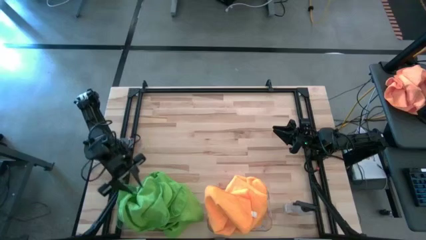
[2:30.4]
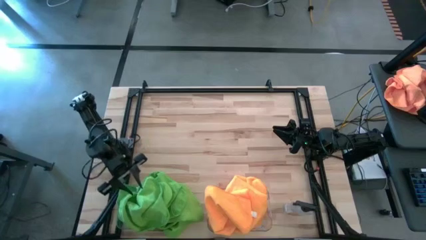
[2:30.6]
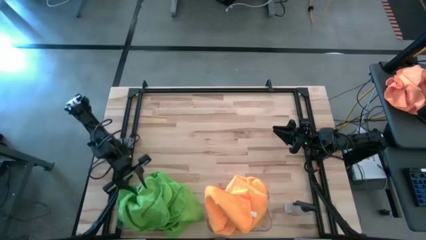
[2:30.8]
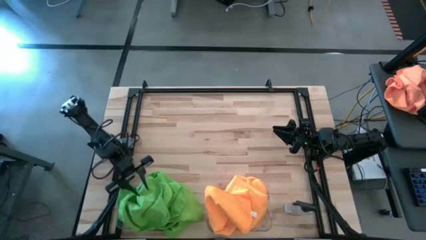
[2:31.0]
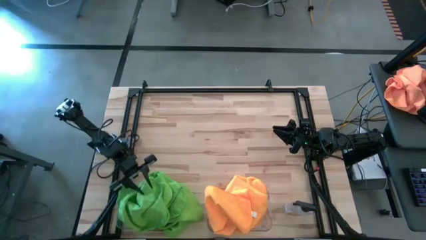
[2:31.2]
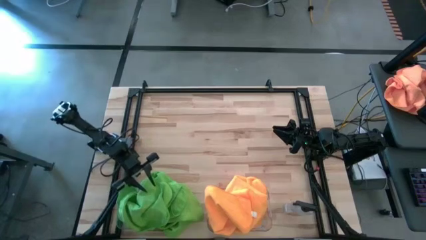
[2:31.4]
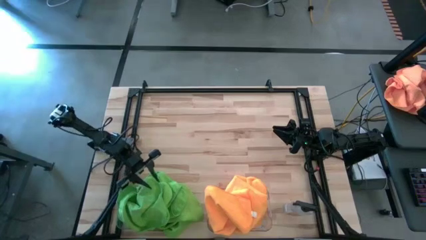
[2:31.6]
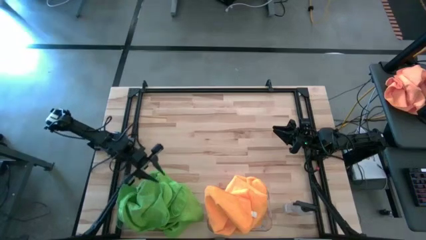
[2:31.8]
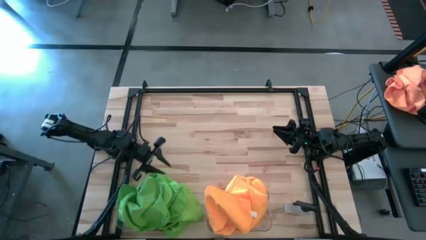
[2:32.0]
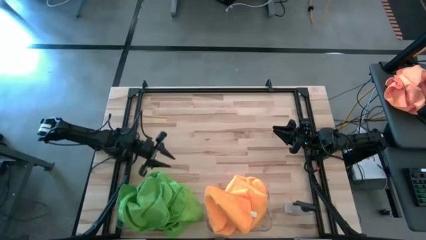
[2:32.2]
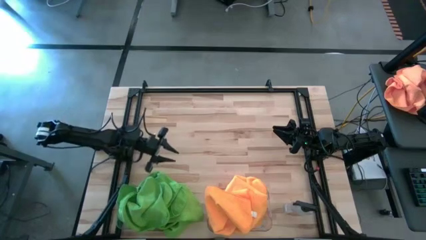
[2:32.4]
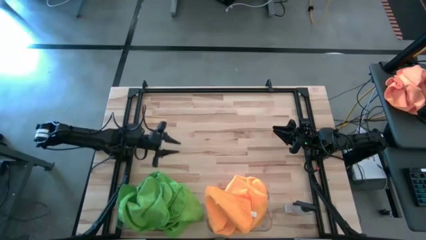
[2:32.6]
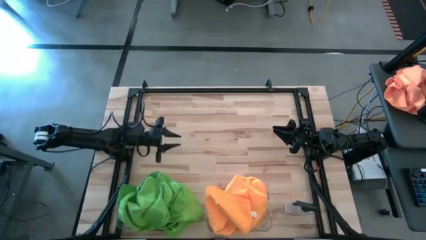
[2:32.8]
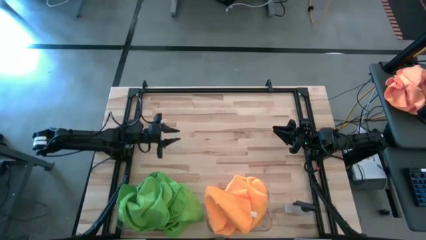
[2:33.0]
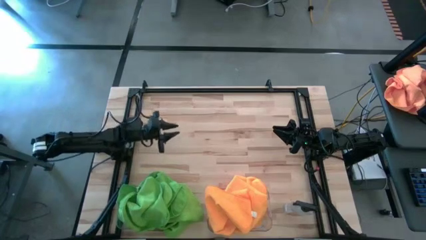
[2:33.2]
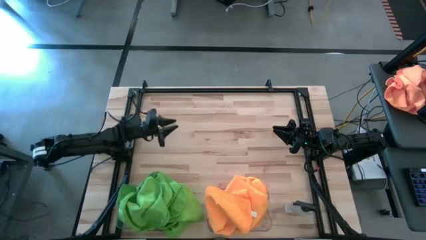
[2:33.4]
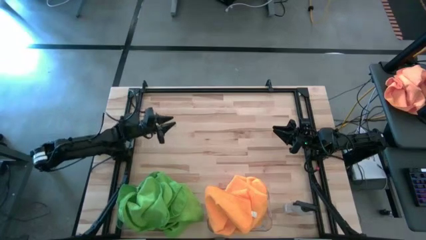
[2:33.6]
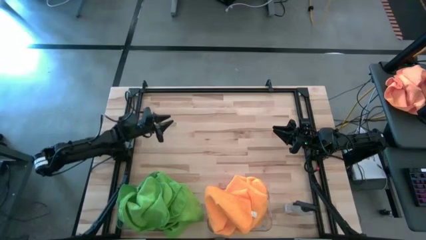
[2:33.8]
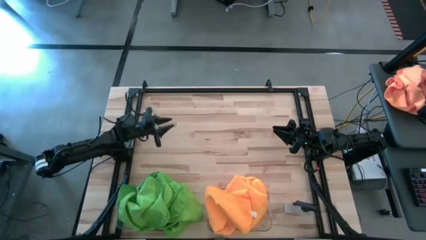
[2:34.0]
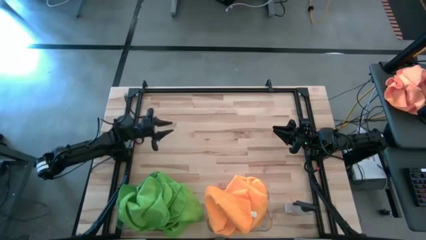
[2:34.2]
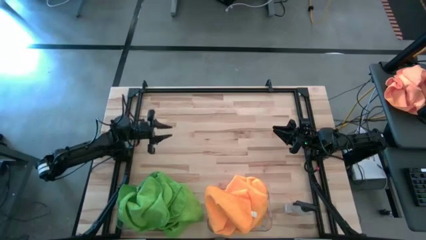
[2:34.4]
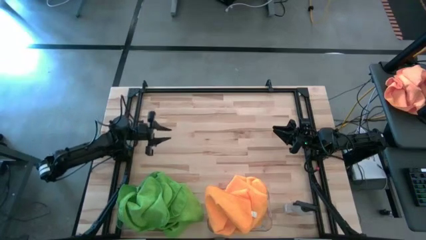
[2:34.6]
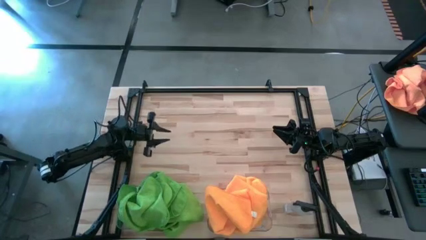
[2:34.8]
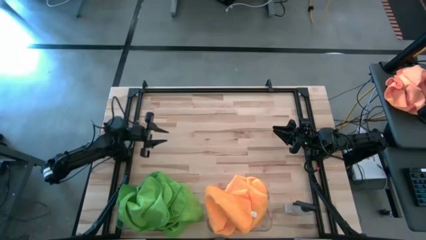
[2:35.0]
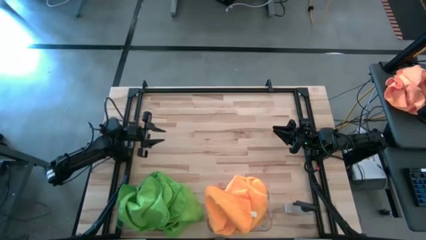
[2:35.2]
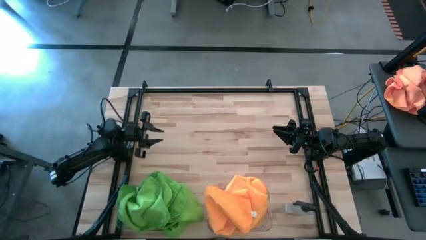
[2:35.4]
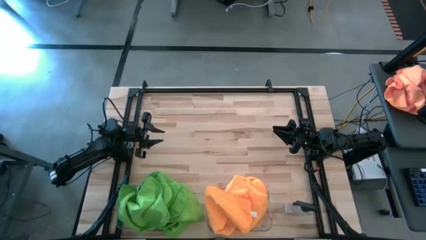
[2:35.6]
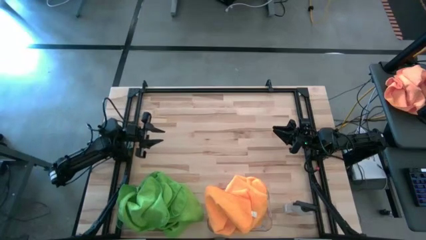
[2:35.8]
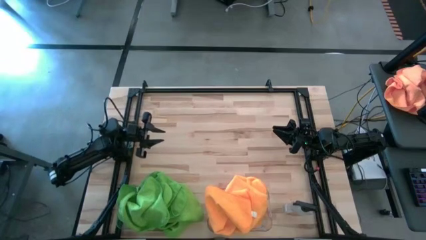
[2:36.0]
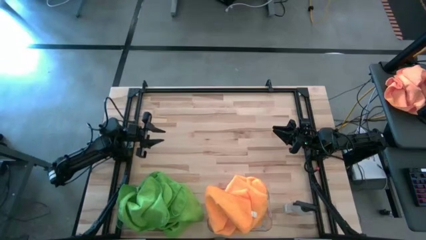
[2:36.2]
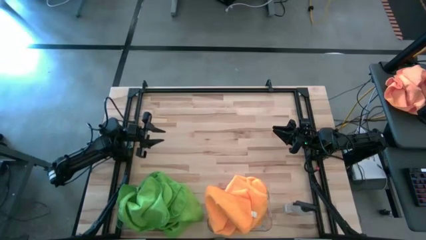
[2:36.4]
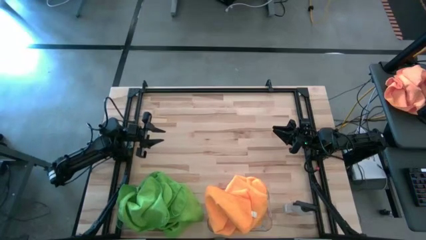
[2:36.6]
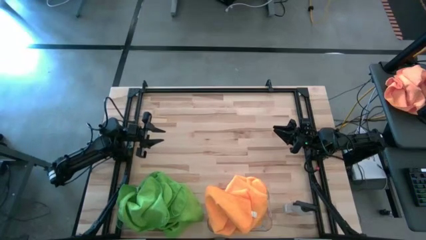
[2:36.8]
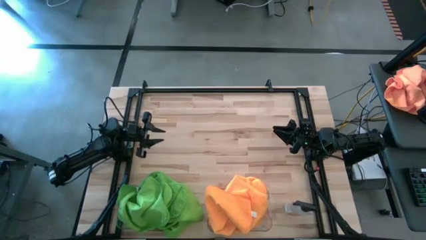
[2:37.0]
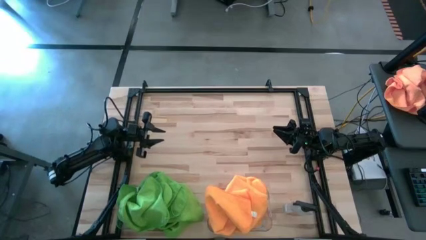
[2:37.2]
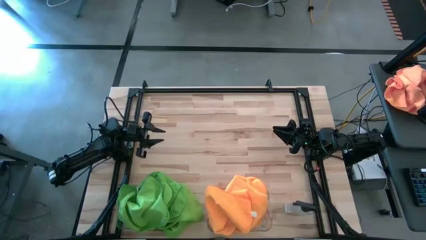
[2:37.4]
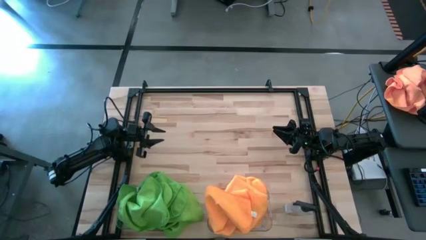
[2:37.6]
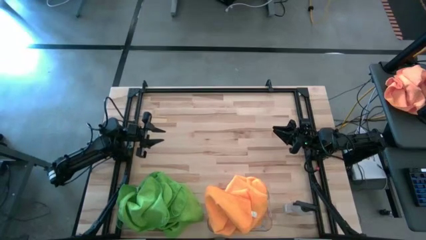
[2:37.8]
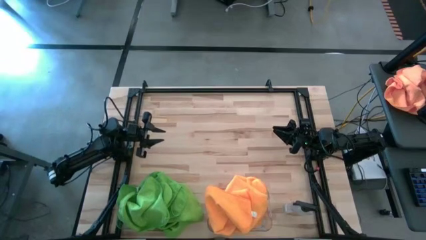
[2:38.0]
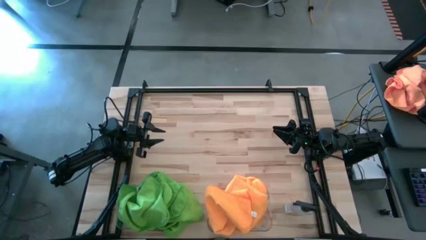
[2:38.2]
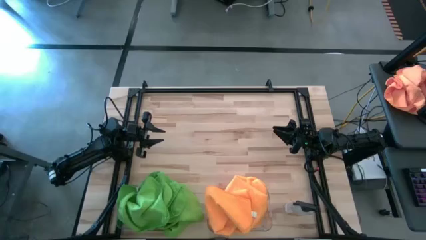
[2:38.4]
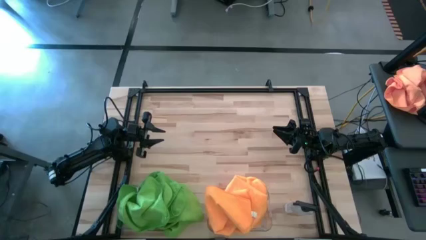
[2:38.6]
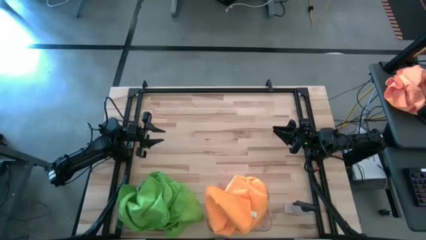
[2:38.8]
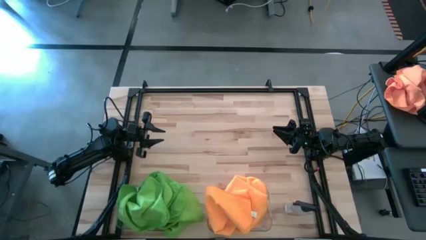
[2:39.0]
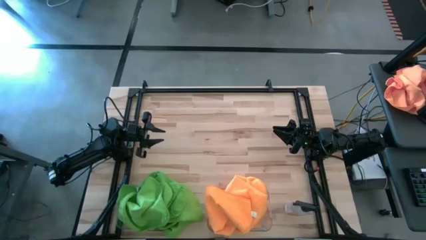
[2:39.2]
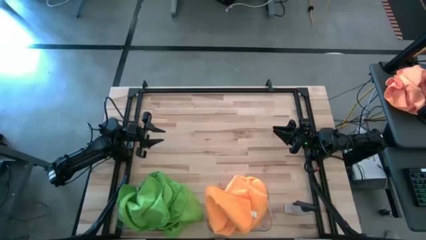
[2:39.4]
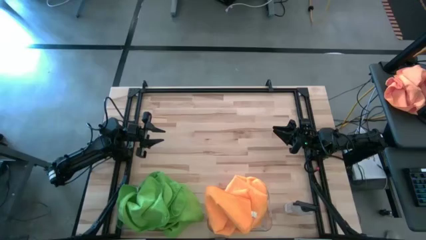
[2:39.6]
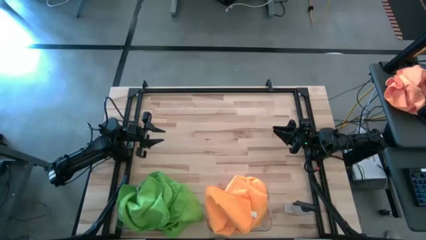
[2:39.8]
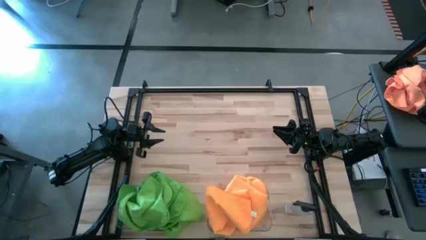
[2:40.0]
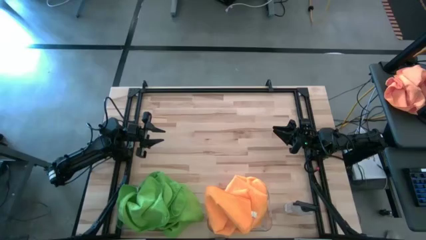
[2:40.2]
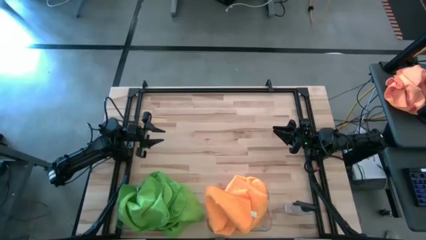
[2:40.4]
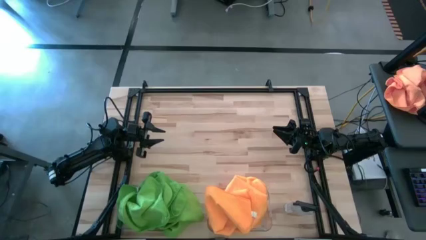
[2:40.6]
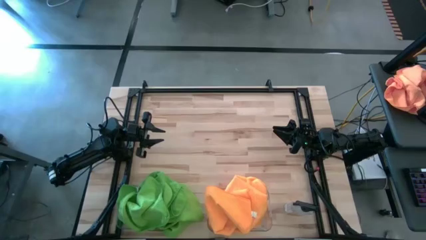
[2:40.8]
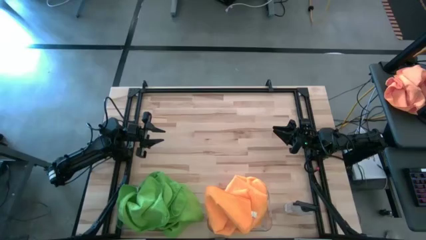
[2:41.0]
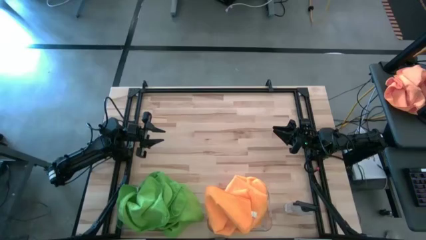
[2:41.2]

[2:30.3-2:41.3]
Task: Sort microfiber towel by color & place in baskets
Return to Home Position

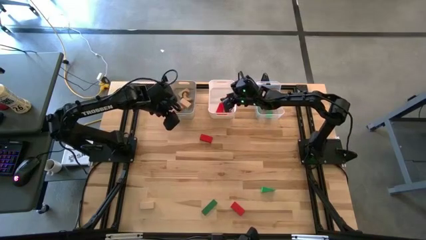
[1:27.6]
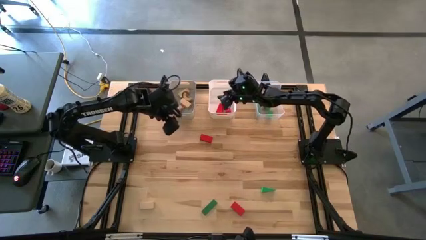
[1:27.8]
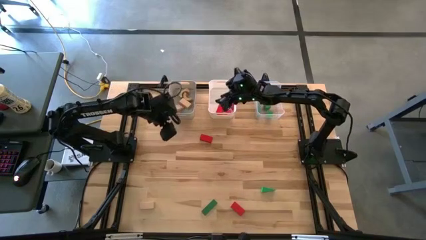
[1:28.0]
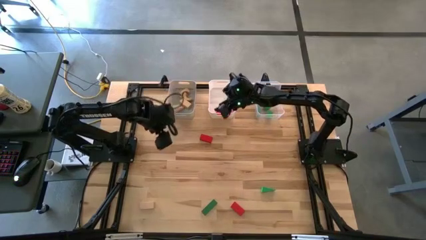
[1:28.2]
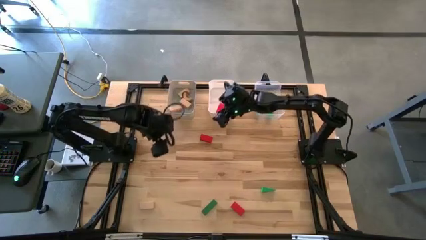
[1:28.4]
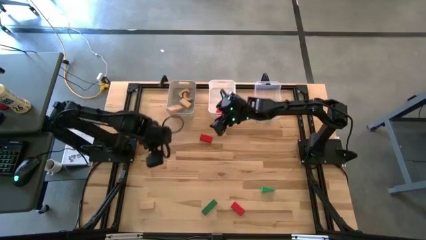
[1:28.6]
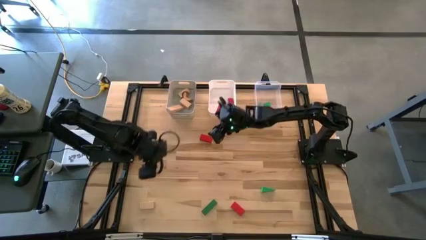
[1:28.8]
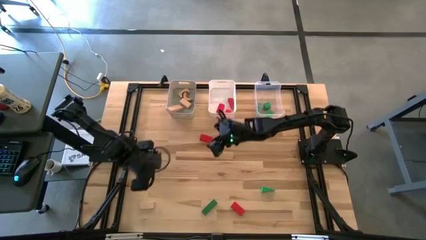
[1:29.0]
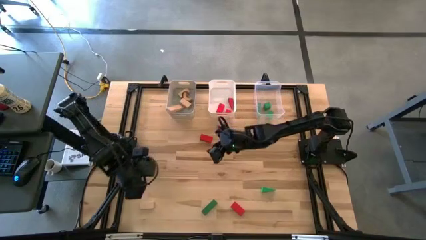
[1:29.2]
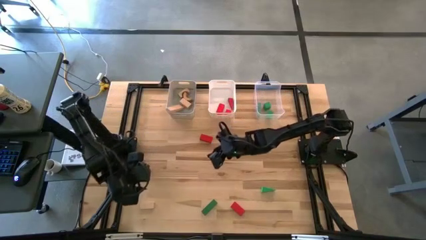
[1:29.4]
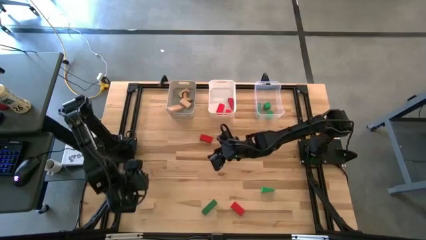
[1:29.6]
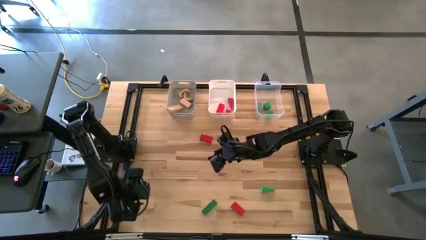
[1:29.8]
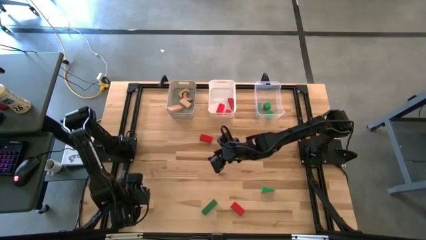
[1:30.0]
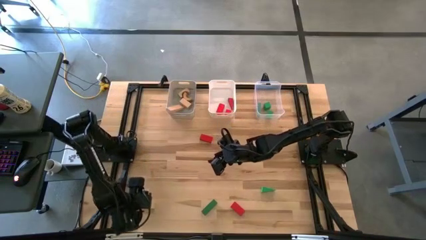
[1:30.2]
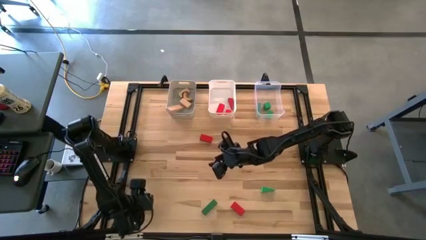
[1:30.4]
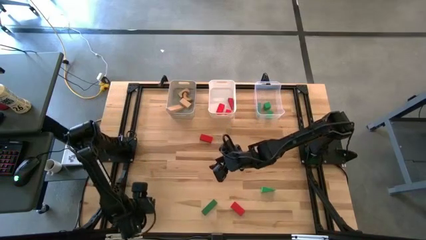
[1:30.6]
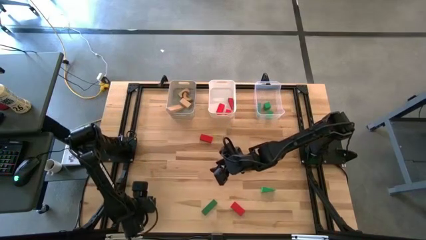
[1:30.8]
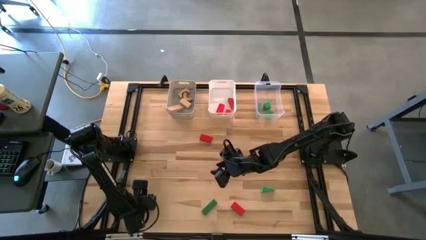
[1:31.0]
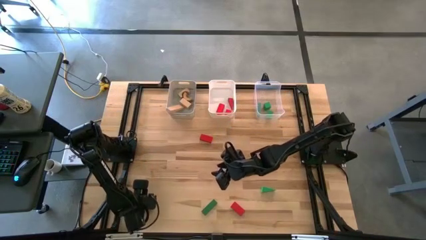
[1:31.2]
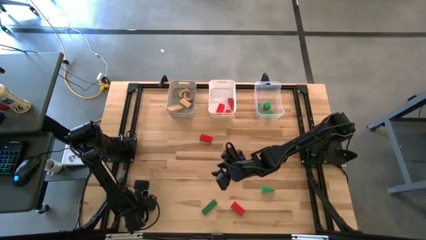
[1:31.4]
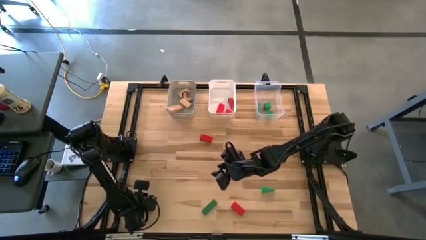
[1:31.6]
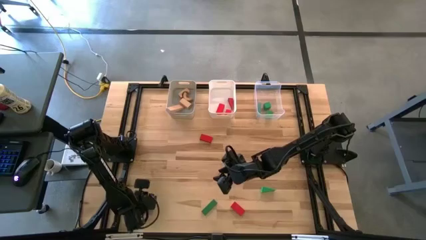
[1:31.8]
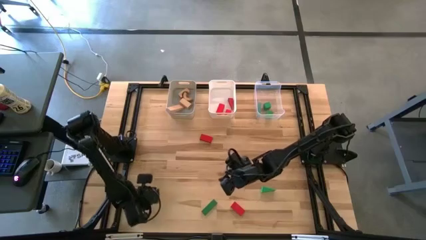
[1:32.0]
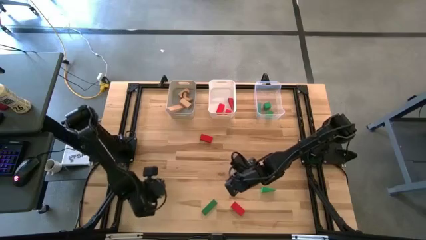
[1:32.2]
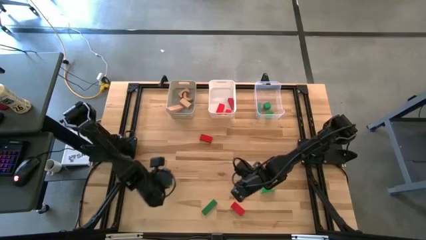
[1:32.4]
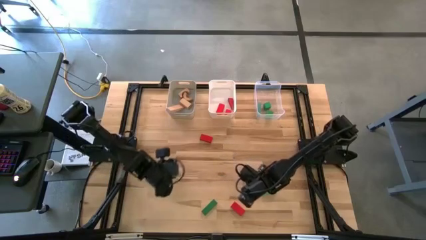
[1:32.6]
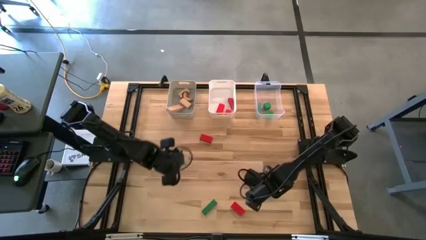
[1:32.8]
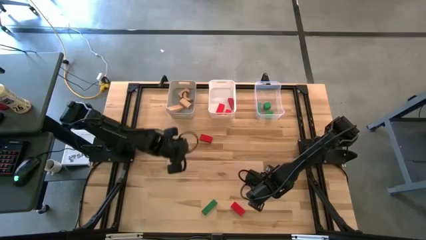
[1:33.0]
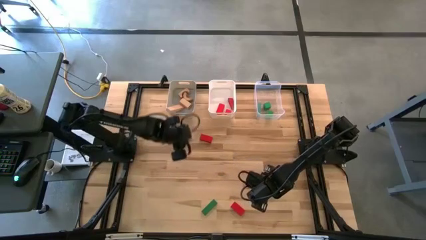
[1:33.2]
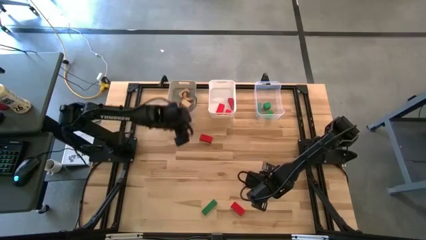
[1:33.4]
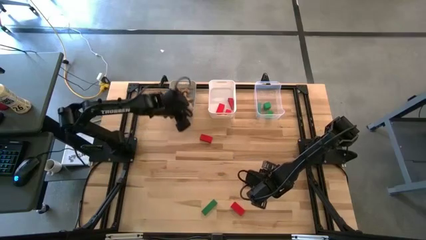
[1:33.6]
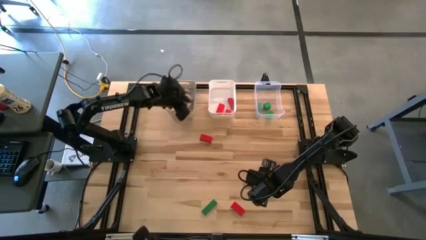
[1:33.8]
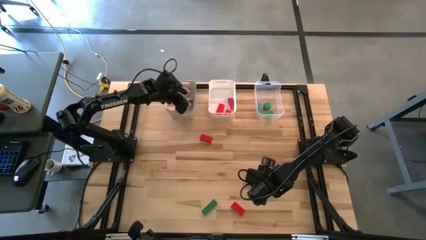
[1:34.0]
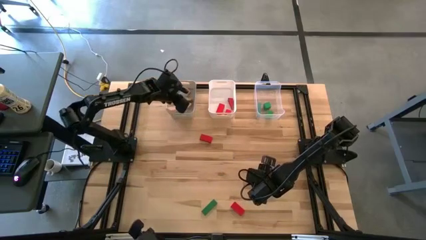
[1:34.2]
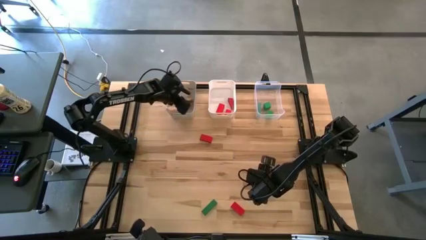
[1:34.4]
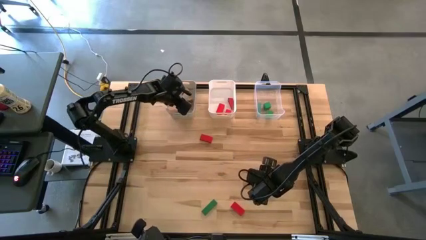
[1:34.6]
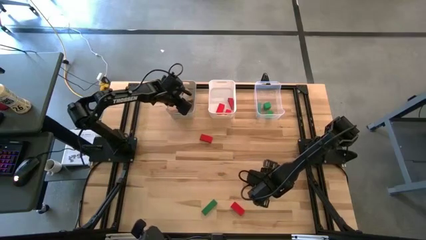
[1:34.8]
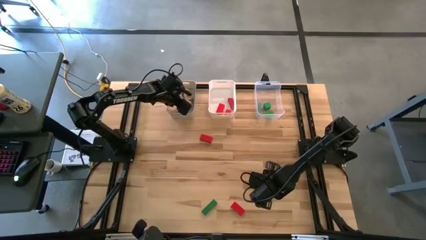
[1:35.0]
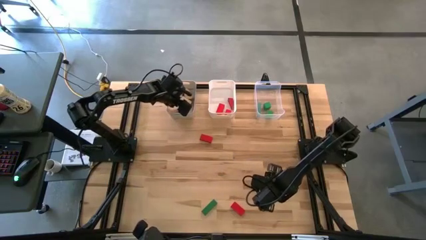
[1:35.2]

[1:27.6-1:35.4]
Task: Sort & place blocks by color
Put the brown block into the gray bin
